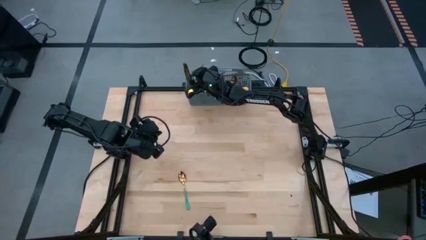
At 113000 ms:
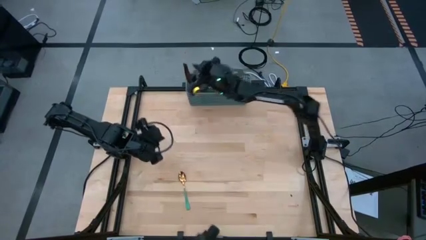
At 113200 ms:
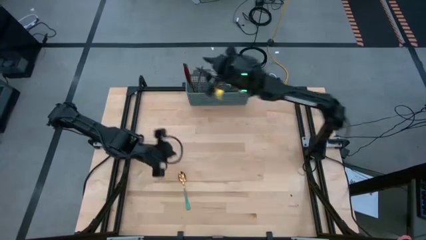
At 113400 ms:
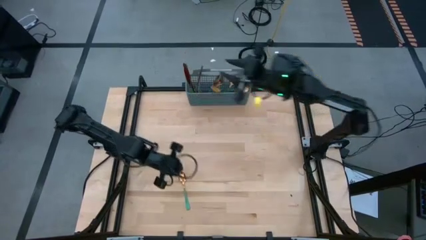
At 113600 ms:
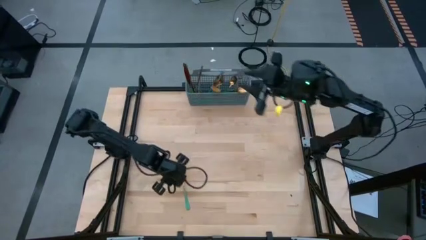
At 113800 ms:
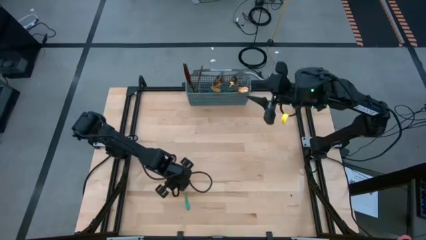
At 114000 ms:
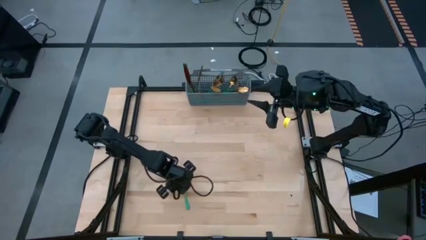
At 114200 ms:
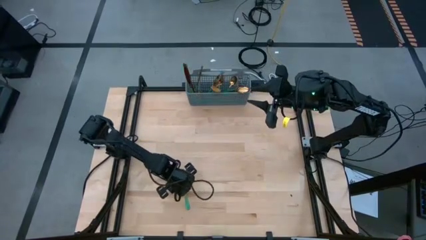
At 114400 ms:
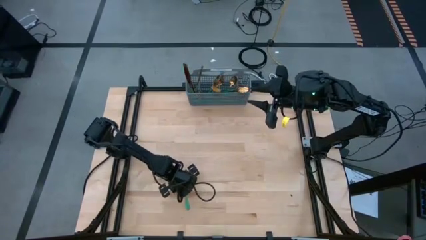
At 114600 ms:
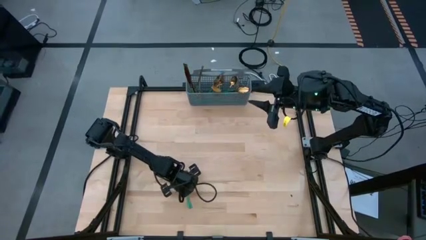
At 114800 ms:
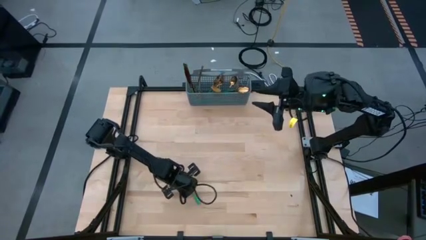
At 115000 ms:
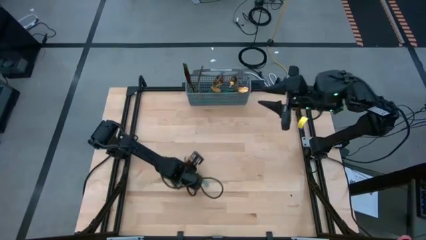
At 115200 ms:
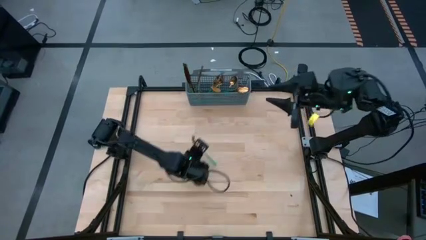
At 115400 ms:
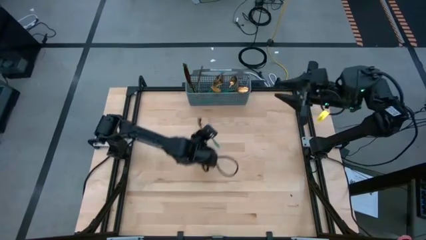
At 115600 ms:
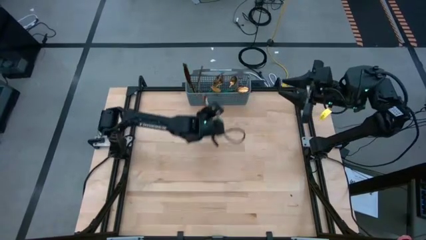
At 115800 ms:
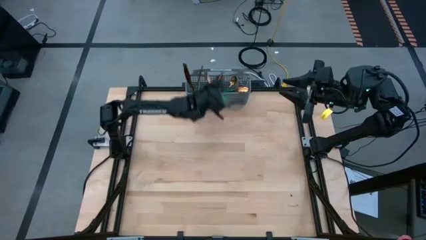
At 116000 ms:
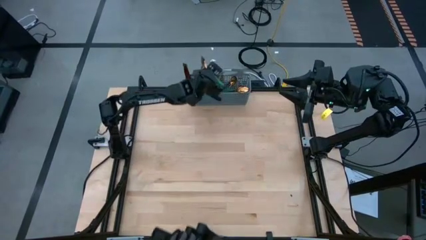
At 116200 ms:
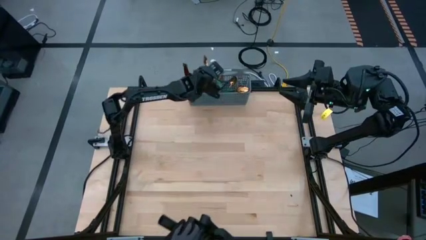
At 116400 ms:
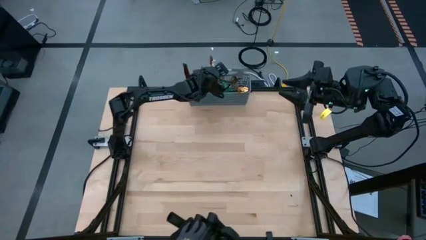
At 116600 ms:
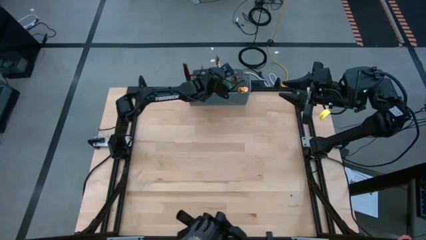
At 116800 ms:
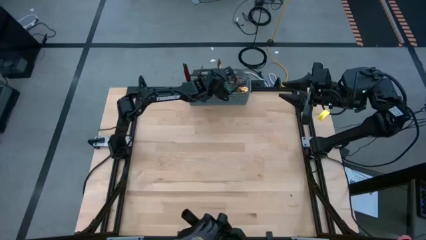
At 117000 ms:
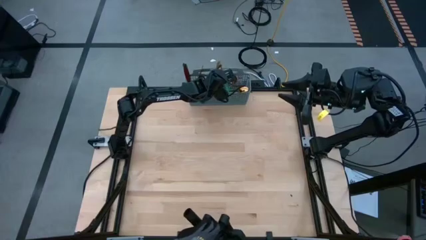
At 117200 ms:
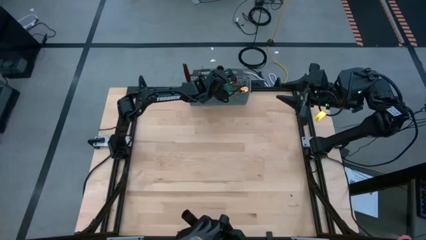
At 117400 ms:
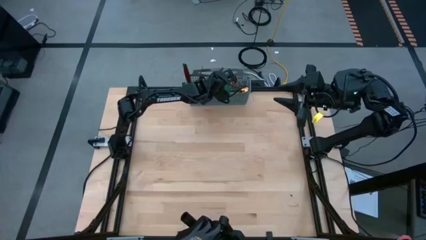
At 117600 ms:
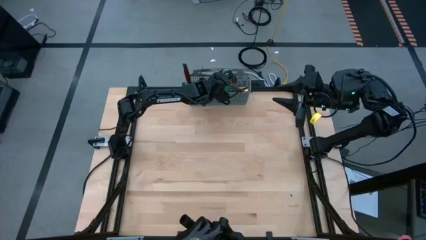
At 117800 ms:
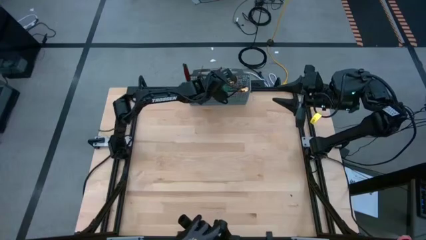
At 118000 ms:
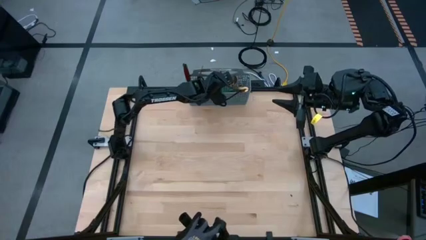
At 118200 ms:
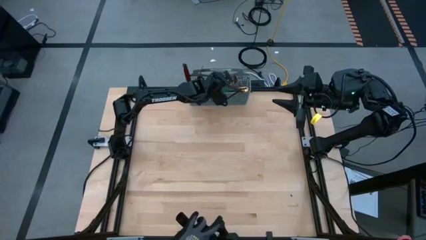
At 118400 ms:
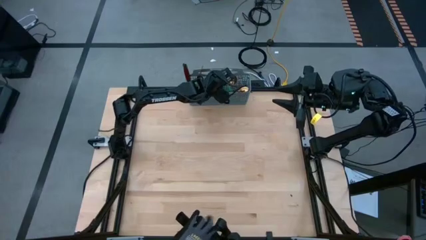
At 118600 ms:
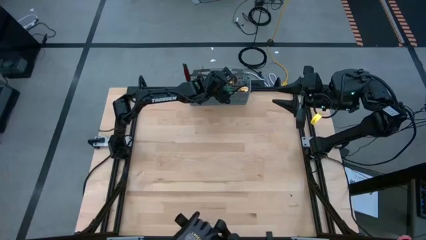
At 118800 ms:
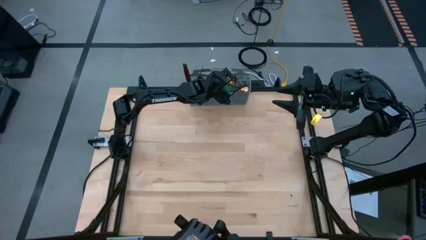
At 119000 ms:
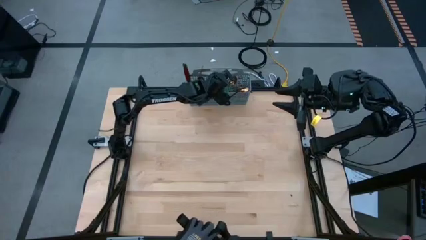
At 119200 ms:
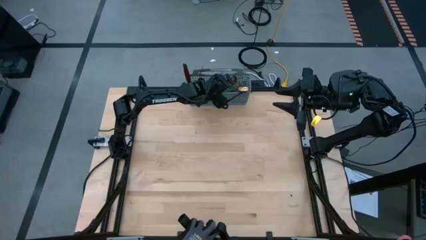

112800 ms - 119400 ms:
Task: Sort silverware
Put the green spoon into the gray silverware organizer

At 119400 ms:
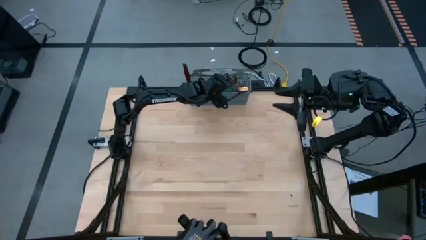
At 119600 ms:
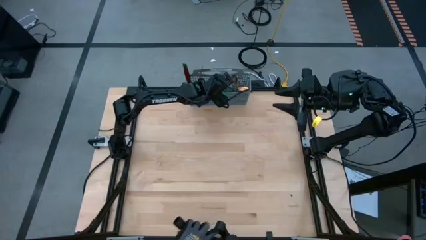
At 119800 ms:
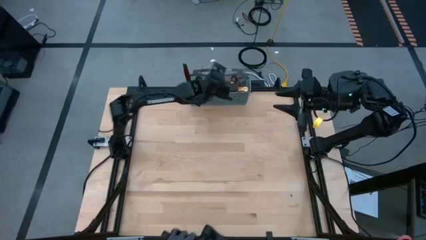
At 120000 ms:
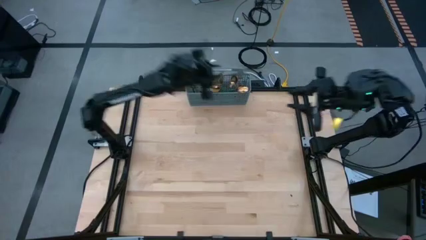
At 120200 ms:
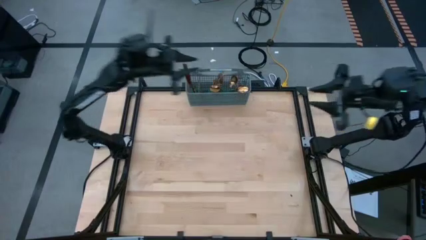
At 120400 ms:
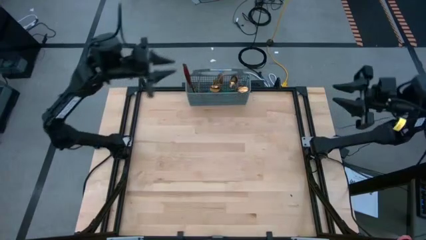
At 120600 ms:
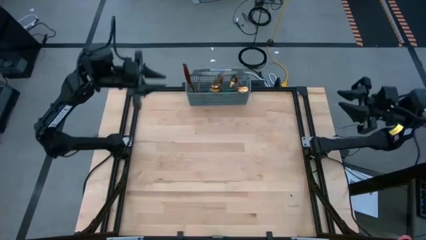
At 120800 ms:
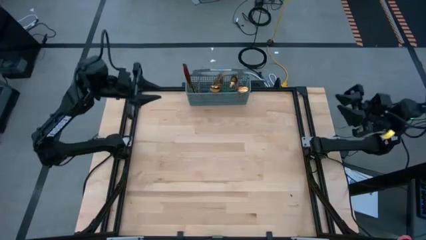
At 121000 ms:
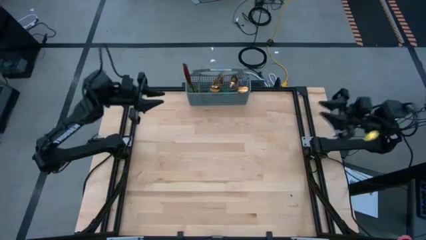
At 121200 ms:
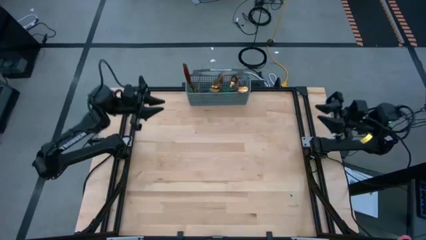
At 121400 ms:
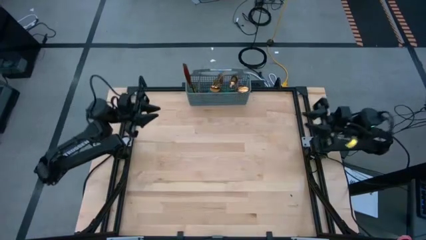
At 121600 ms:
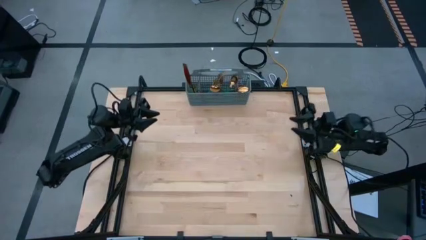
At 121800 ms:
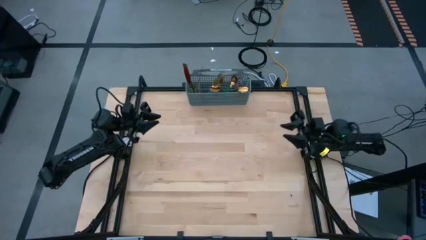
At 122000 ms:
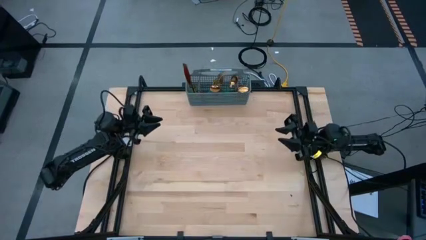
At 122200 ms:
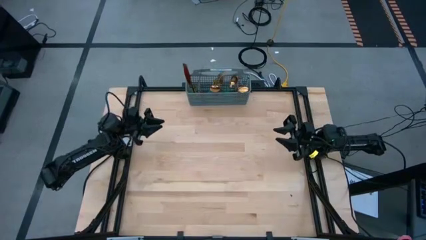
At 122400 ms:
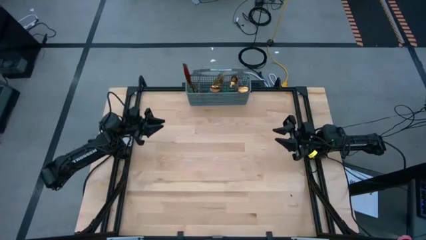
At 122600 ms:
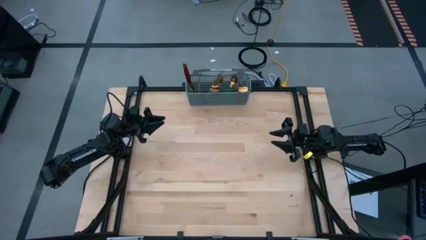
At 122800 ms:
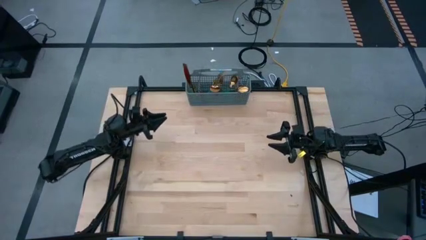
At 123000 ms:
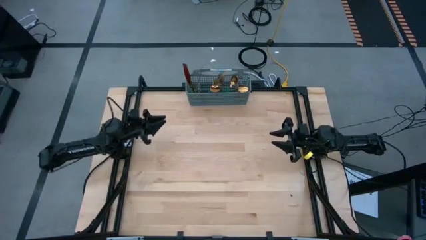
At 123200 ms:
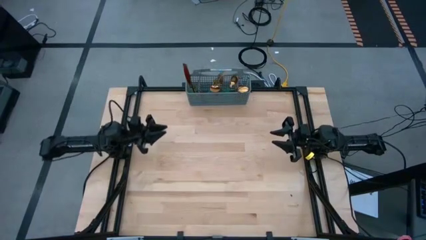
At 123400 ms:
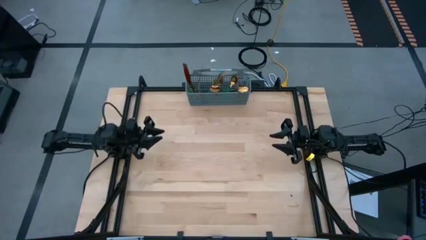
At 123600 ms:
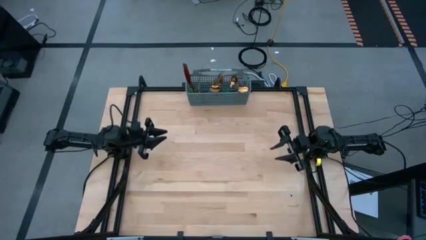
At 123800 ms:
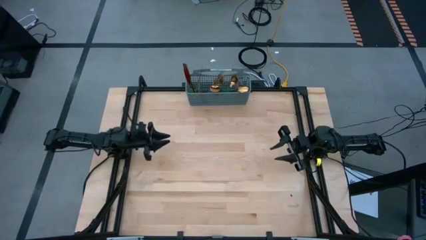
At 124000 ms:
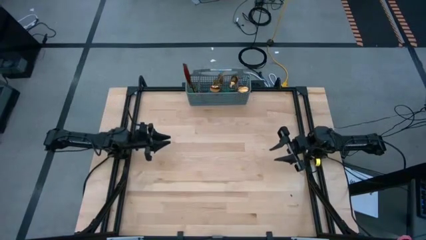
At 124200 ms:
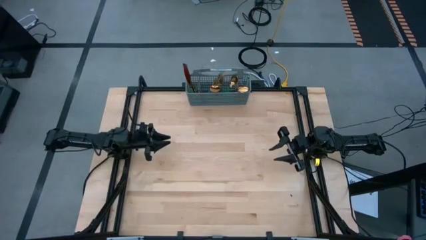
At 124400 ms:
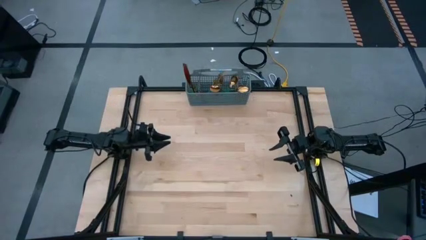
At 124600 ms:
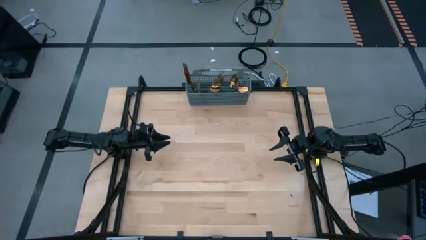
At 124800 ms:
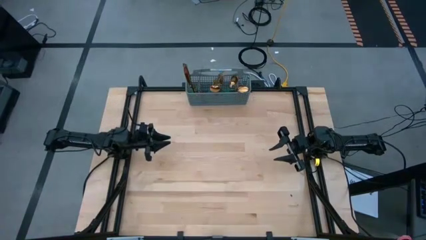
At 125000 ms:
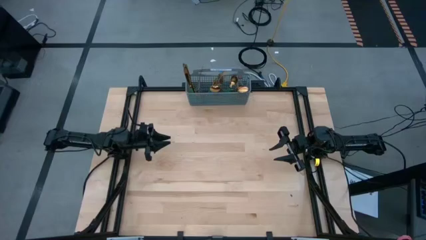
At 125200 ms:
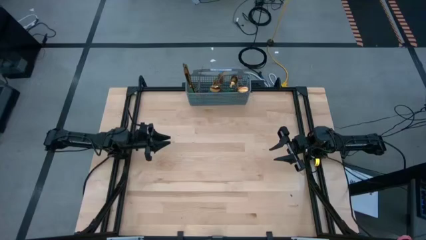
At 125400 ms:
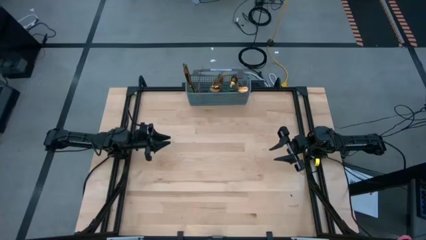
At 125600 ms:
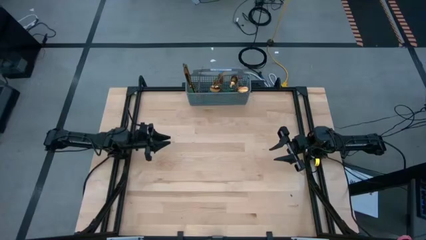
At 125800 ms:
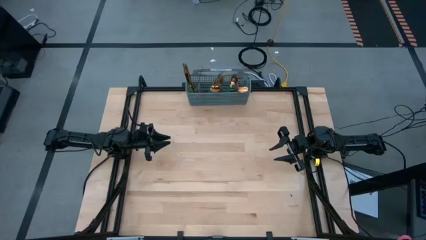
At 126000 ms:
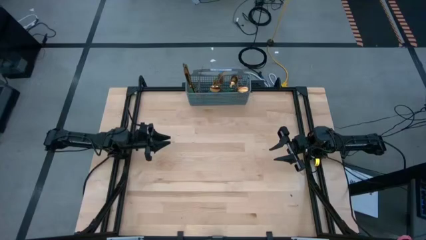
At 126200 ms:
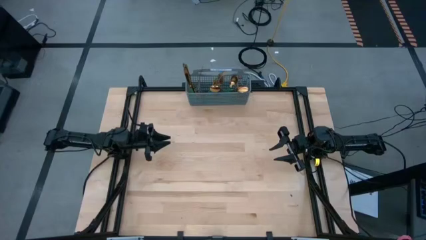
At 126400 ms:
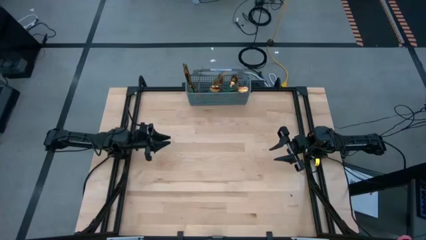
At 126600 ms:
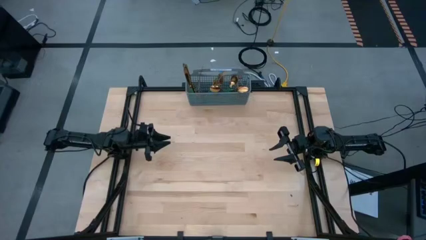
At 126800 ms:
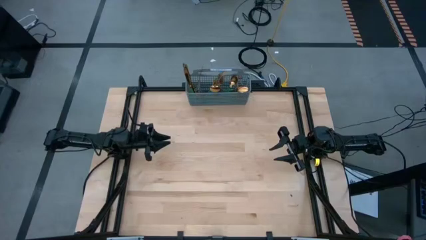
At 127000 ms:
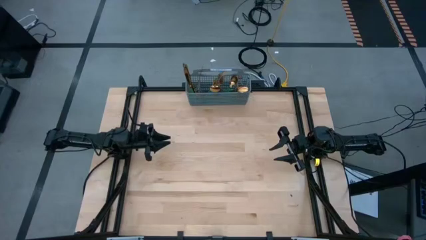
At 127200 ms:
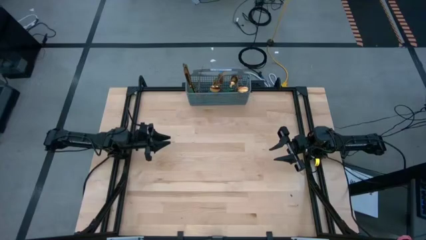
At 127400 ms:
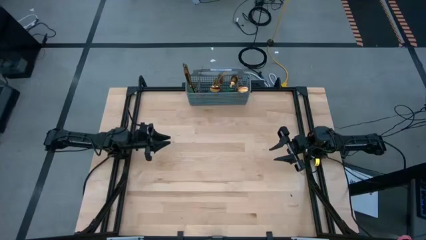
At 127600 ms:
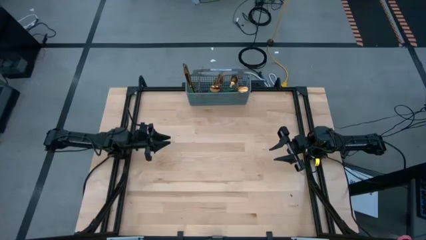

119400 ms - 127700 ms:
Return to Home Position

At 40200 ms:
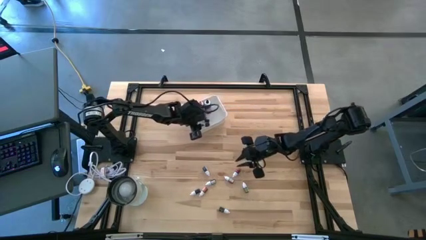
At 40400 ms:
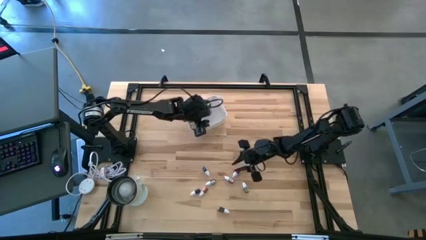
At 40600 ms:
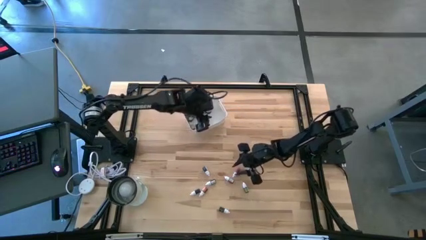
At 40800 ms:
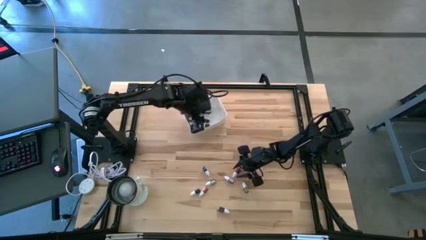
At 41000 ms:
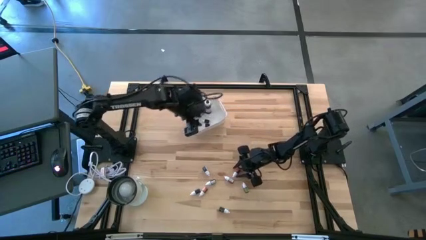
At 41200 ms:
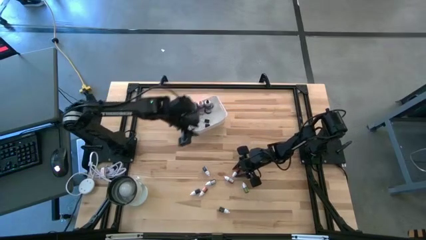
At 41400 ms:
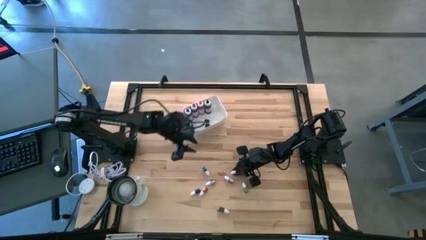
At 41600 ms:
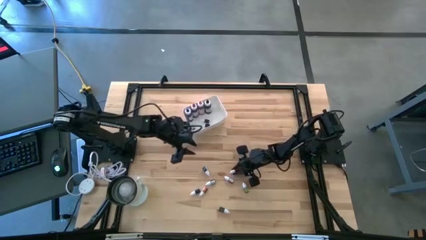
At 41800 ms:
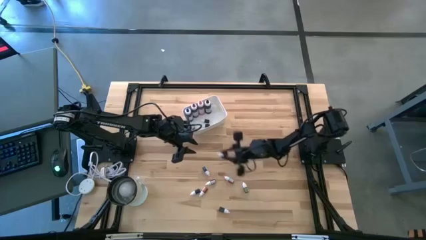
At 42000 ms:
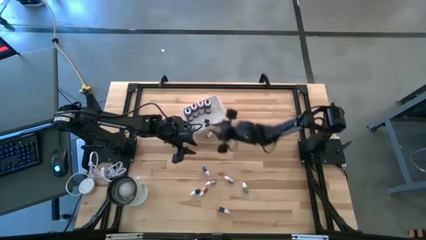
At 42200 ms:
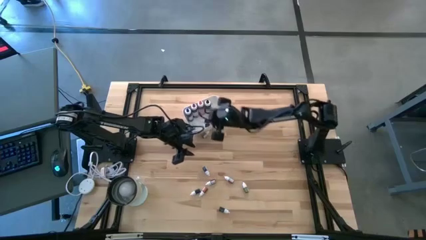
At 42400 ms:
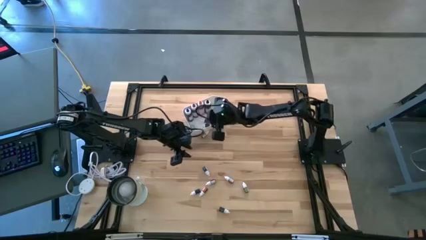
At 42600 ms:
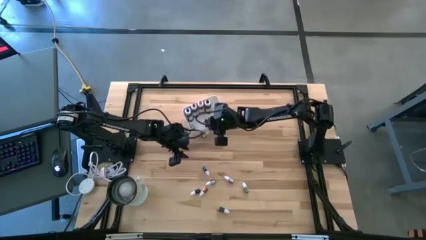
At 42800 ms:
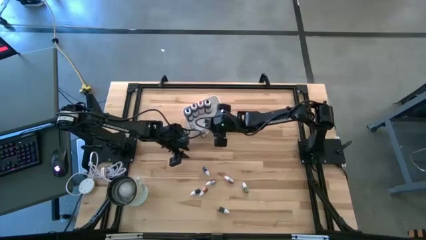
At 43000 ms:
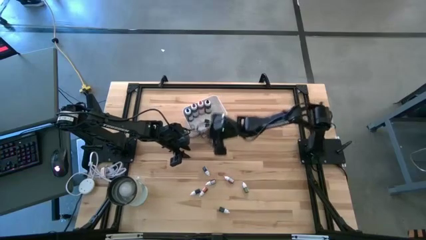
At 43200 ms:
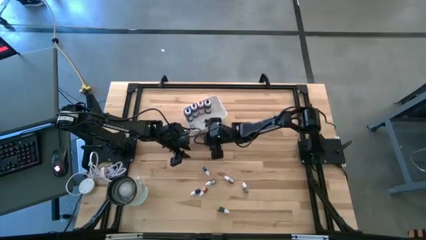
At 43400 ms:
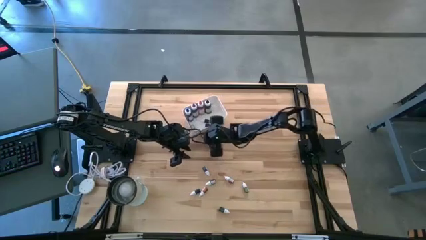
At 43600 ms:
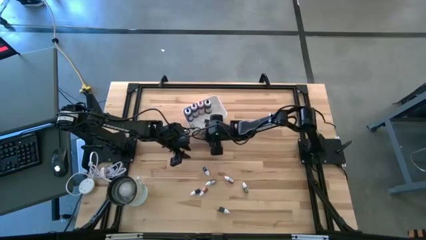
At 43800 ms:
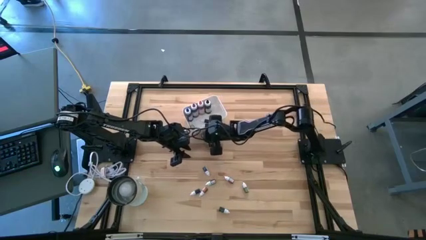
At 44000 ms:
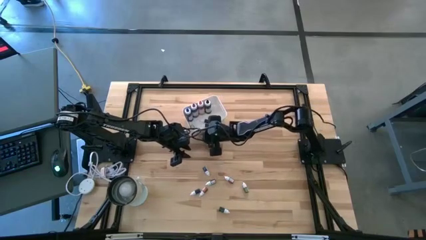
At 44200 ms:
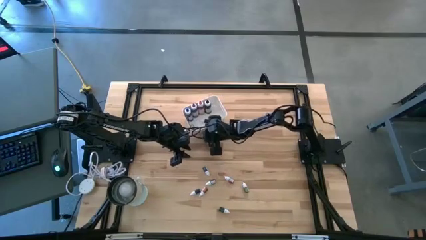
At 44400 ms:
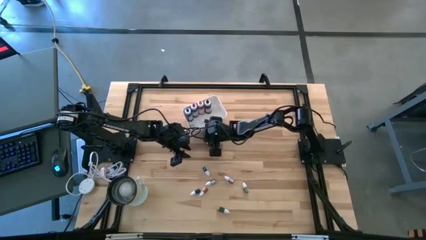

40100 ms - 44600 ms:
Task: Pick & Place food coloring
Put the top small red food coloring bottle into the white bin
